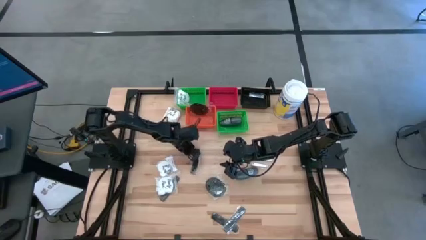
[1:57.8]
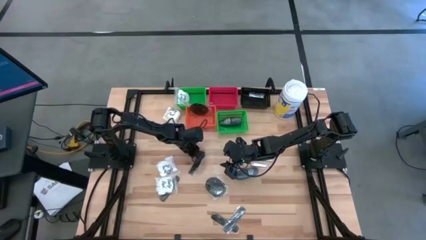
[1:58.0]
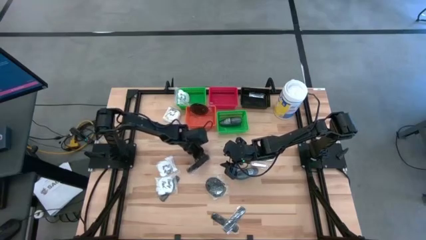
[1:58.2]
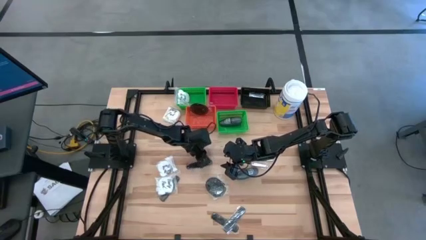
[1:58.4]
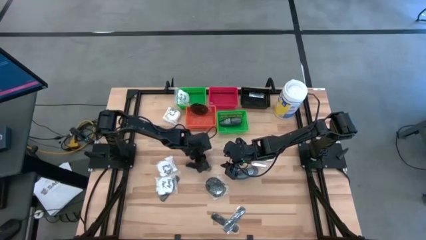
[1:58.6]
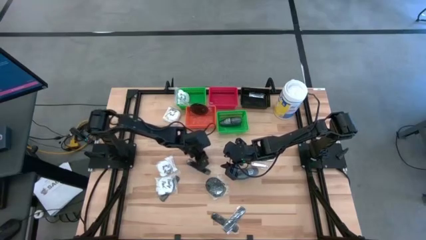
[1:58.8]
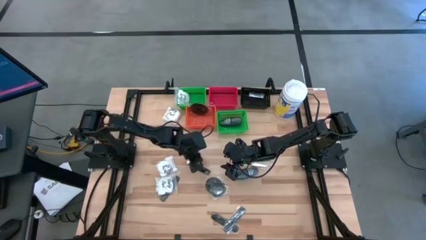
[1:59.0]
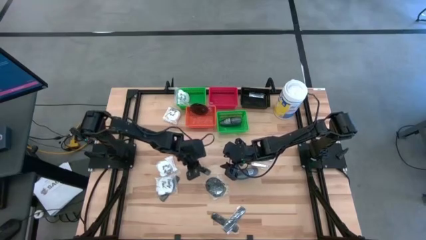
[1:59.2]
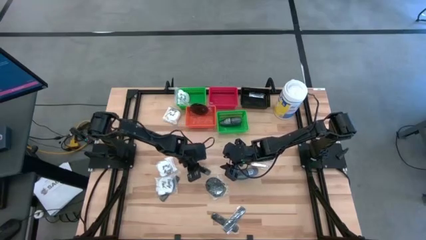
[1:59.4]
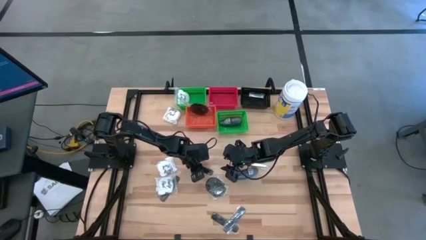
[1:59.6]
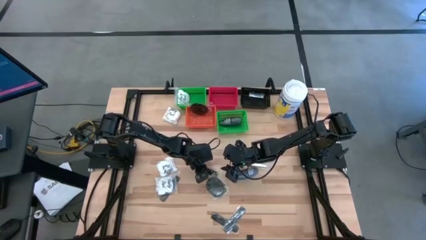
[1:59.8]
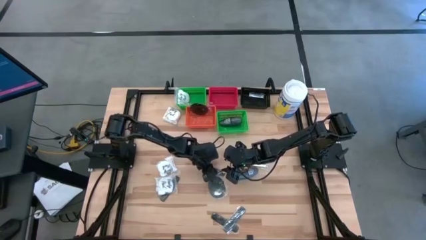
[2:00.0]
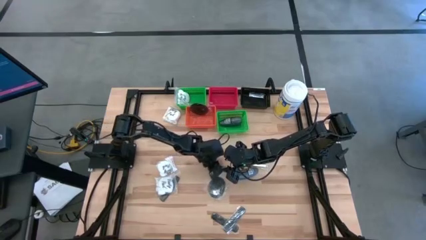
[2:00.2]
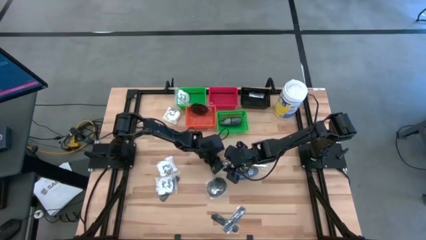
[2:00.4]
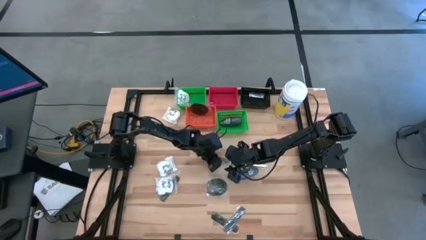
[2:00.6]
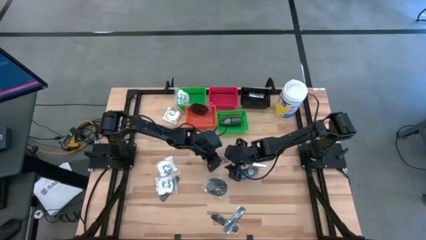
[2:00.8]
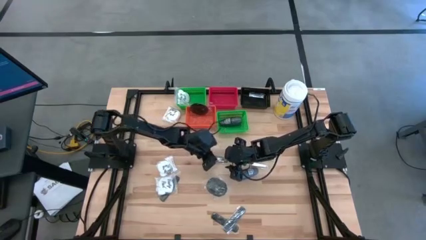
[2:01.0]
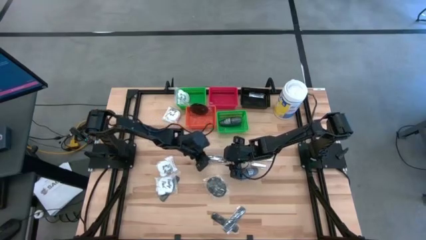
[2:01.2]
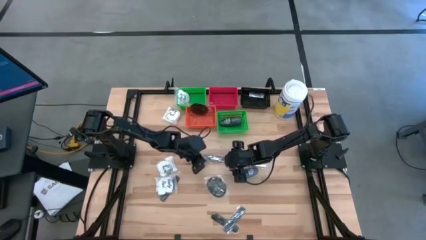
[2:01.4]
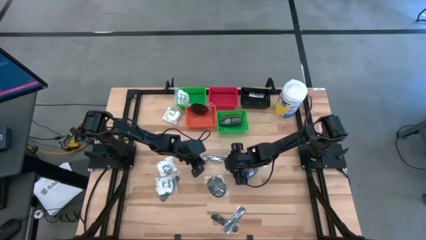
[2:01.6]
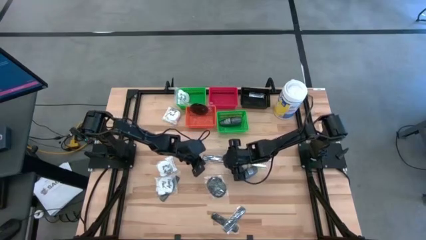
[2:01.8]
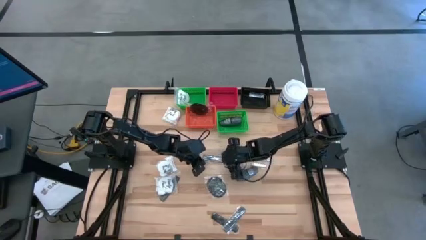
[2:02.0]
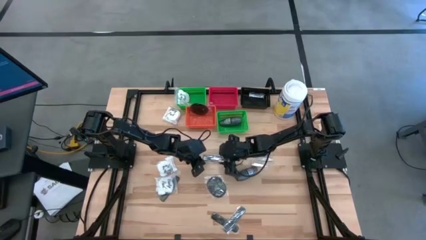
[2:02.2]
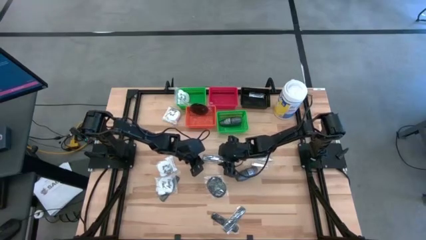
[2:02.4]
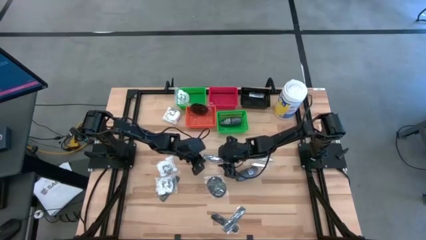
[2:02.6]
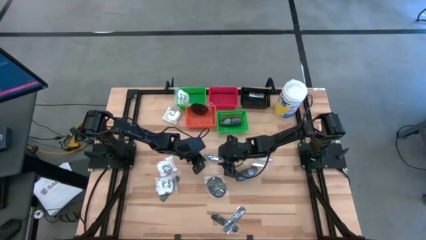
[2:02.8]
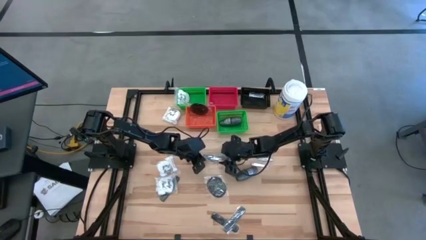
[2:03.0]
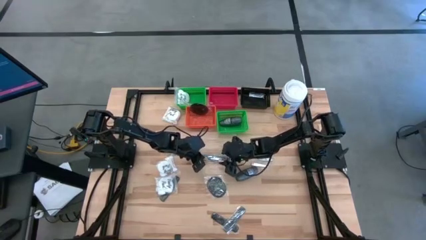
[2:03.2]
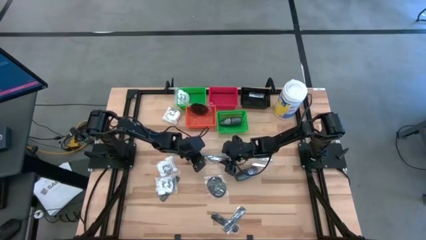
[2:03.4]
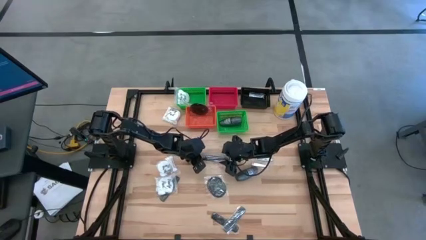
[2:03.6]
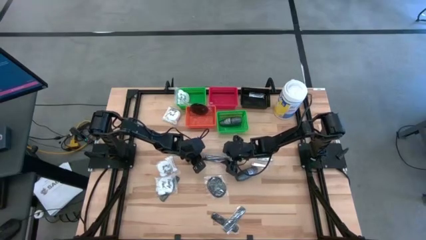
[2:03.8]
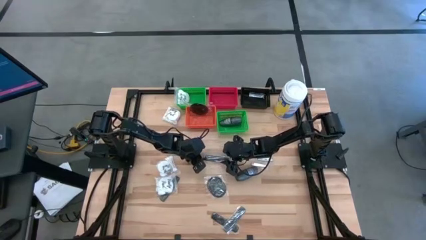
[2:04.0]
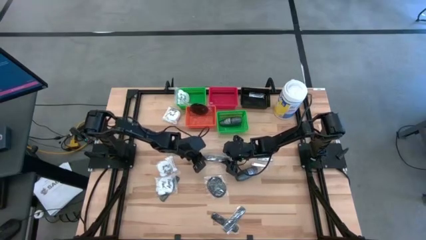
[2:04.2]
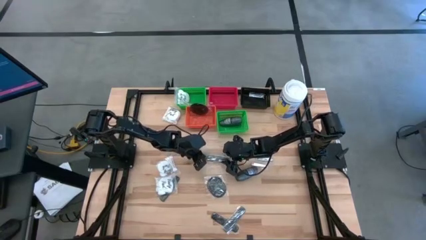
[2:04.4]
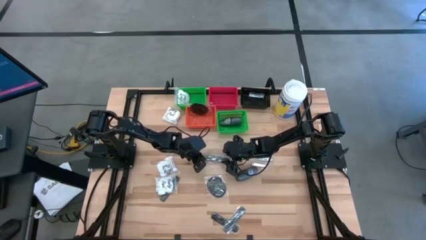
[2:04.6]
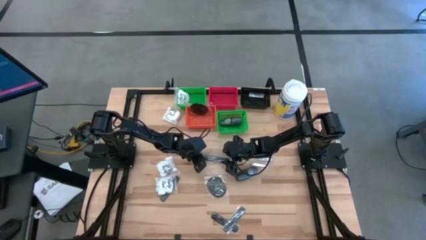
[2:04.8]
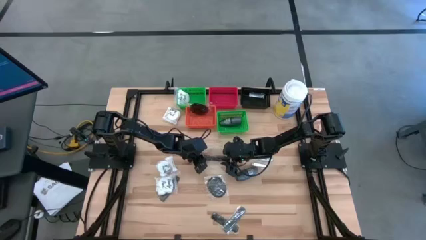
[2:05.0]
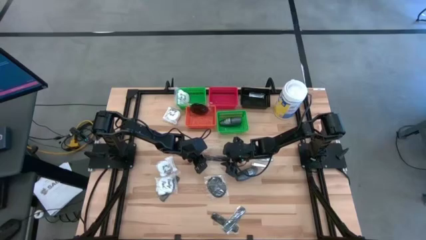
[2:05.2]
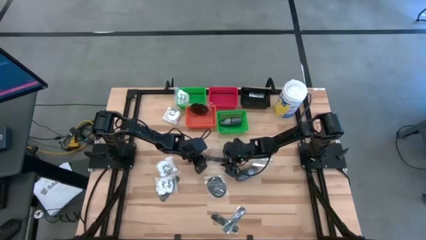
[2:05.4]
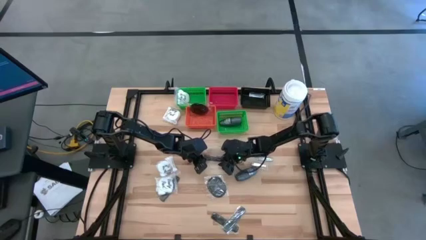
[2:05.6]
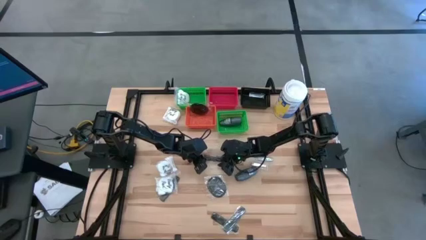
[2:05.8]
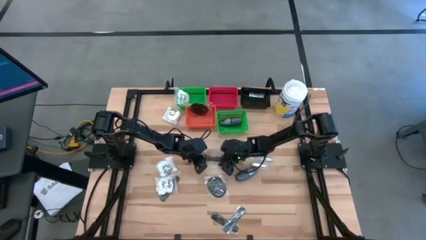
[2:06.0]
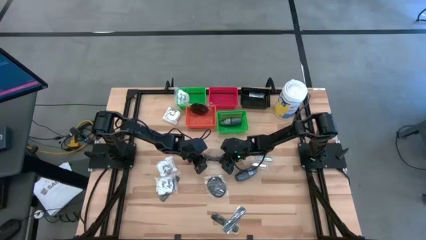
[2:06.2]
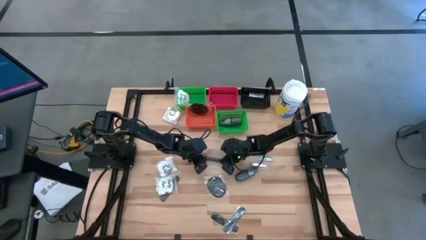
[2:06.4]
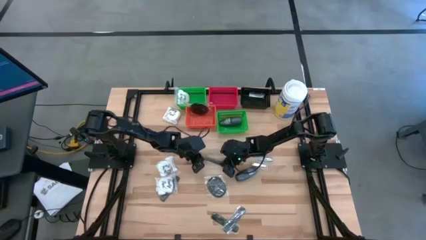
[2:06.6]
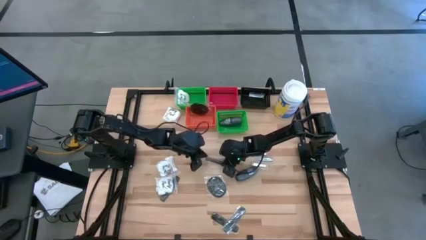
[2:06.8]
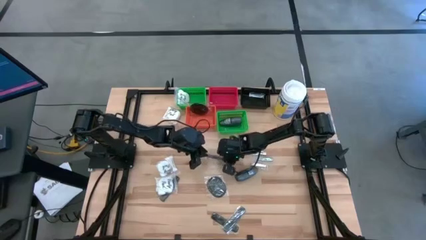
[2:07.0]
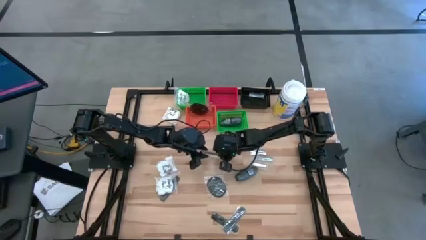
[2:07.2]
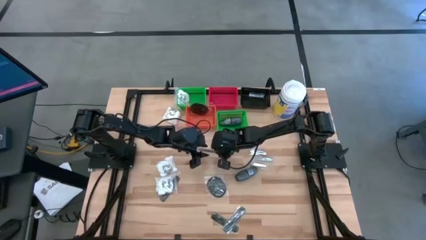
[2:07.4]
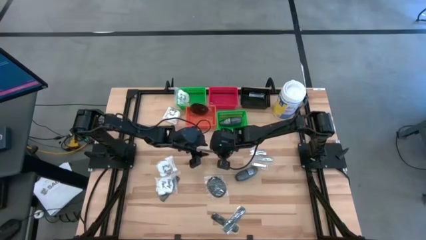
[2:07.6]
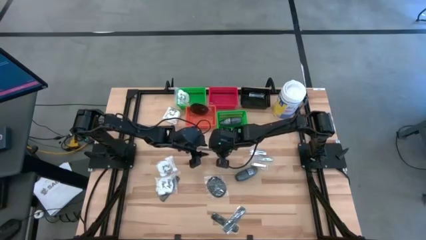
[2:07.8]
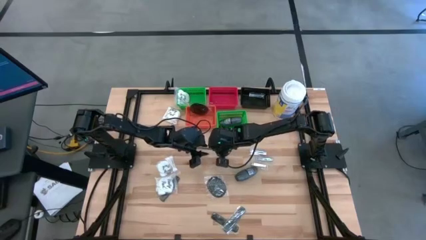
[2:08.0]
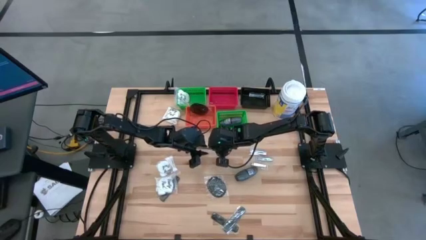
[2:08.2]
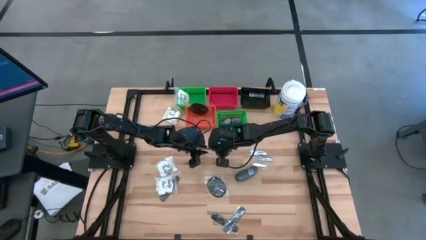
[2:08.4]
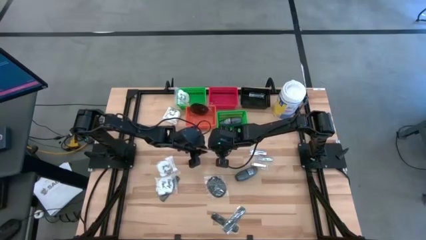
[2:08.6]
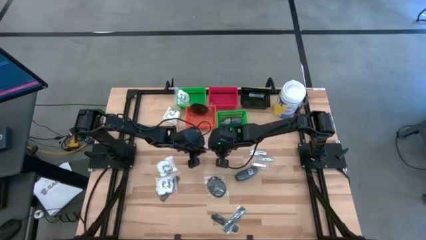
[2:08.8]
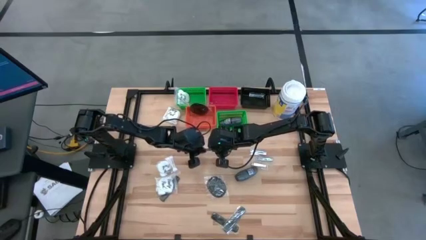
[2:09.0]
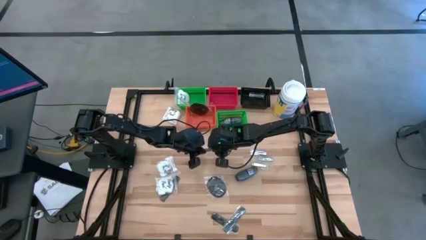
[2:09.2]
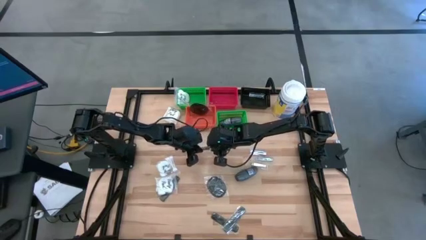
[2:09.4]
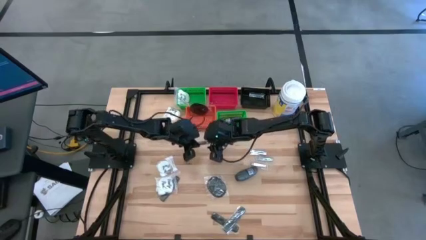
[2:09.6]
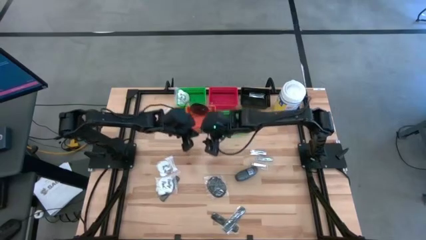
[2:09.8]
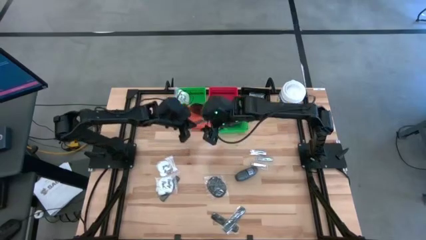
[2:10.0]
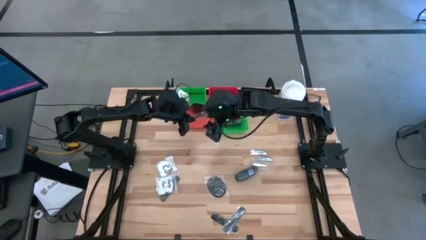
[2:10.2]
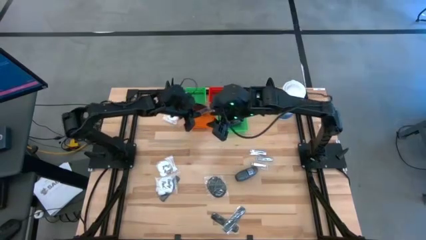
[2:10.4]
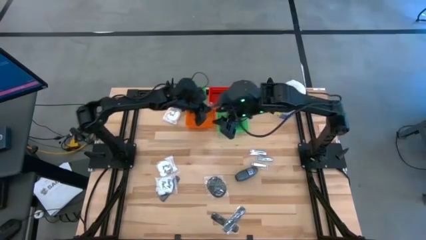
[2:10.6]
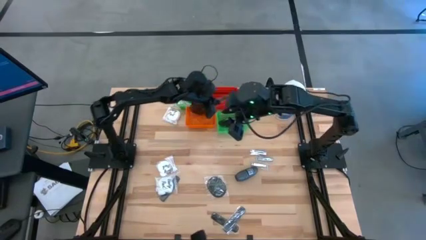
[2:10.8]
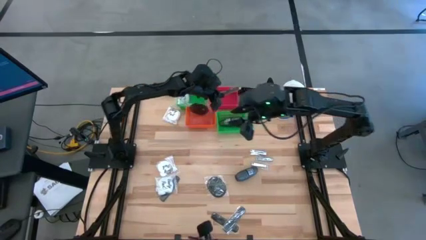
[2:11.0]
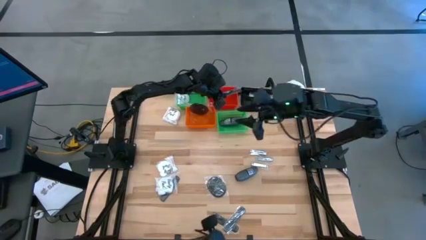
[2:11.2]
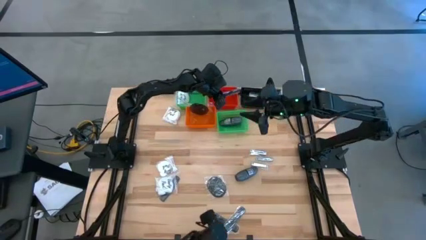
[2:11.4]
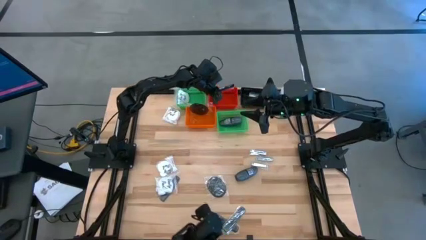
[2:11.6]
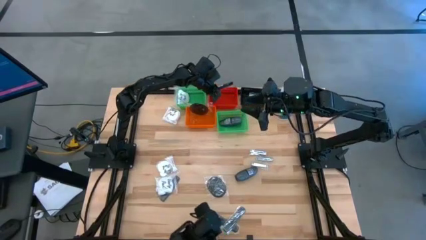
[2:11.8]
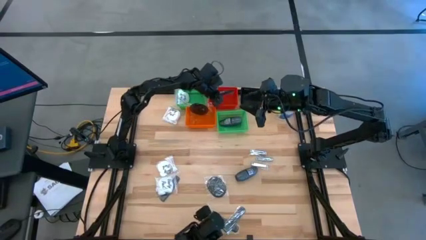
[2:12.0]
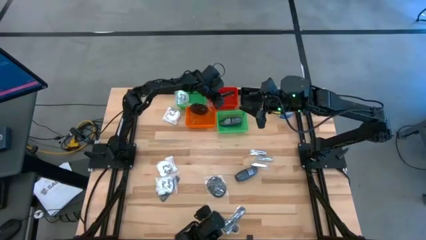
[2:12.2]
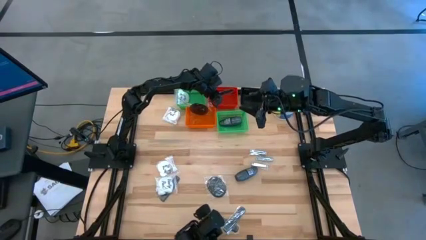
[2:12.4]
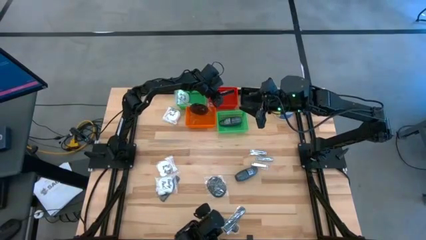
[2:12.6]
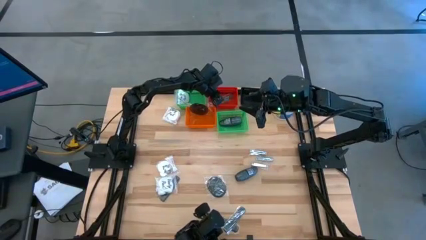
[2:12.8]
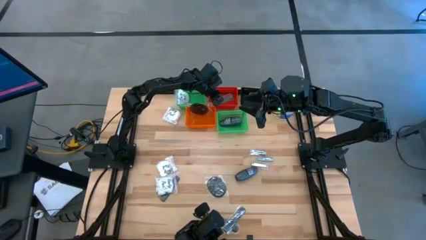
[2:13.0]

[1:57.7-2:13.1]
Task: Pick & Place Travel size toiletries
Put the black comb into the red bin

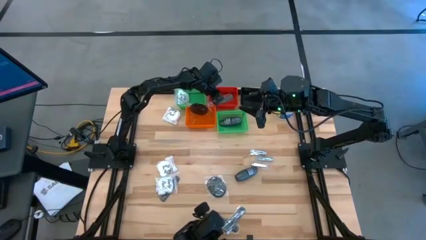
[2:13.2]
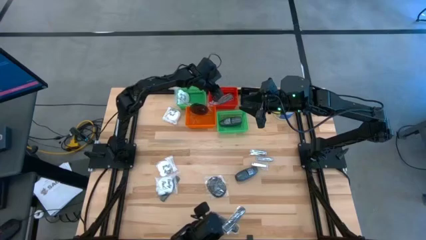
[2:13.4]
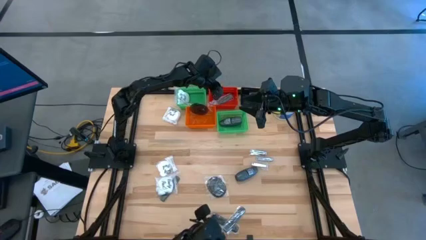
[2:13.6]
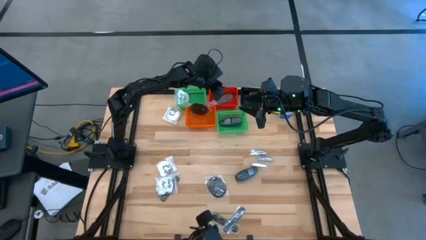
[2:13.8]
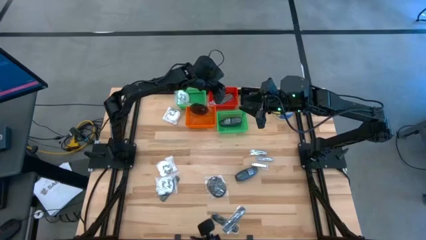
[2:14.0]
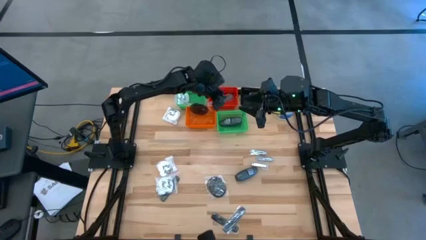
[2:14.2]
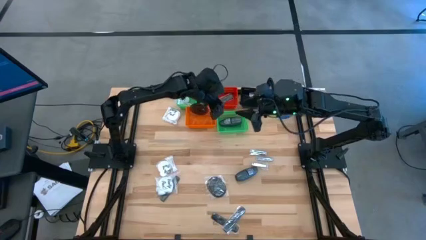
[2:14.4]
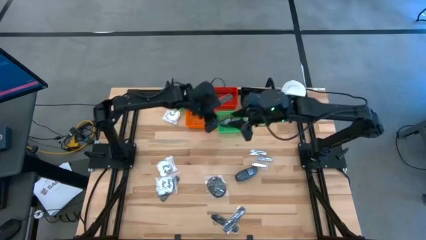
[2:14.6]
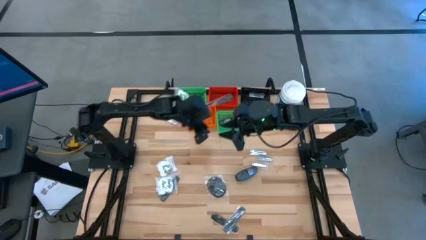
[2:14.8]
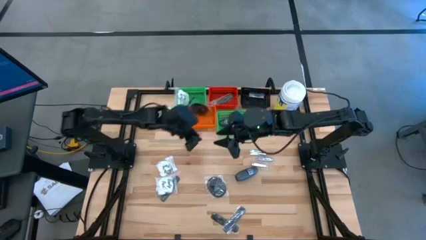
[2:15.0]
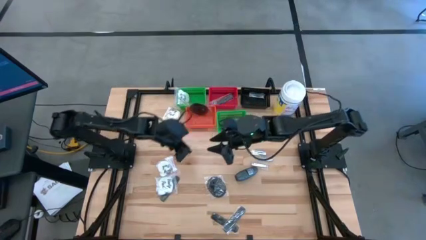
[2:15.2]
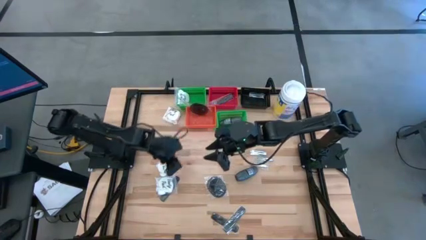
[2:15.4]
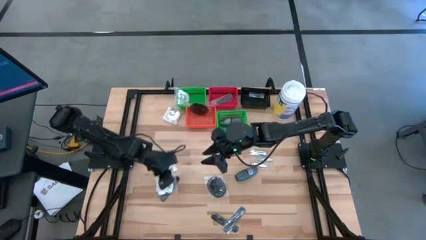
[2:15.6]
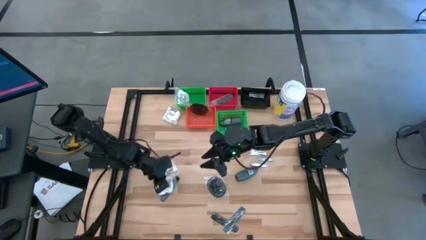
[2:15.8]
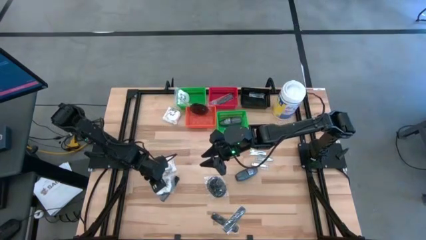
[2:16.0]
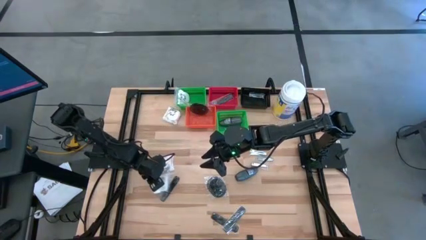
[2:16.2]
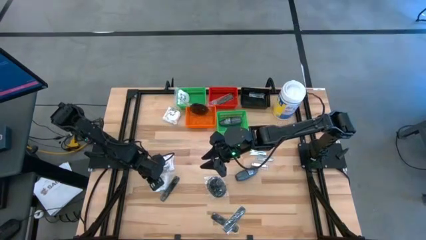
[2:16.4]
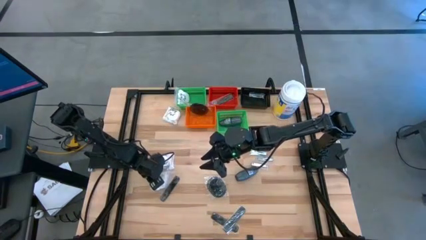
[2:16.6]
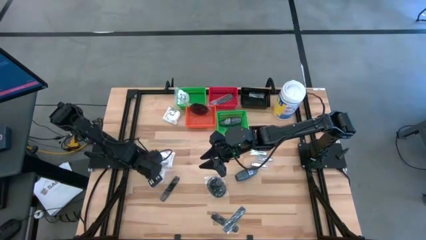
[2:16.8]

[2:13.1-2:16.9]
Adjust the vanity packs
